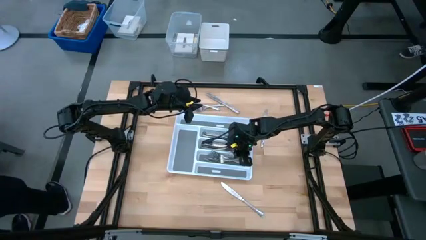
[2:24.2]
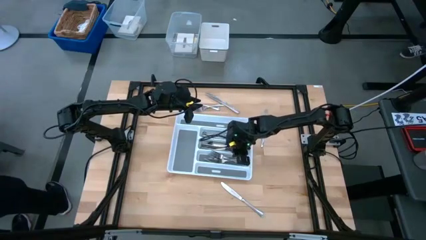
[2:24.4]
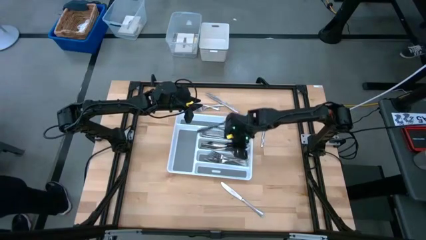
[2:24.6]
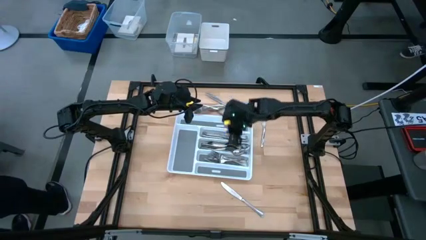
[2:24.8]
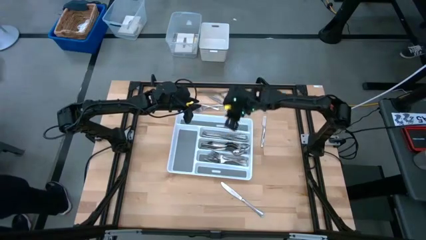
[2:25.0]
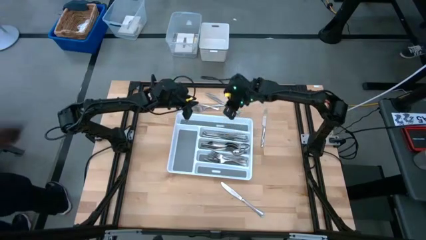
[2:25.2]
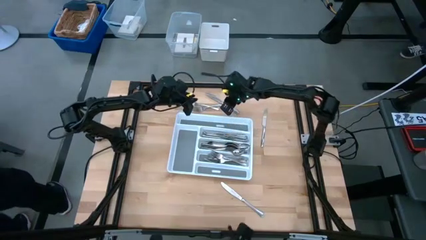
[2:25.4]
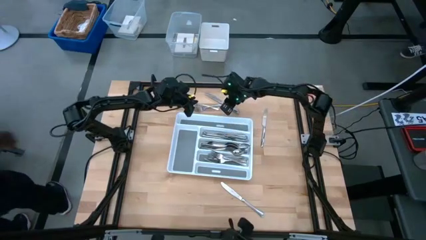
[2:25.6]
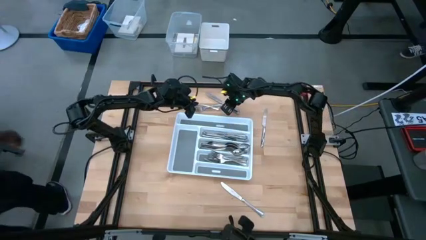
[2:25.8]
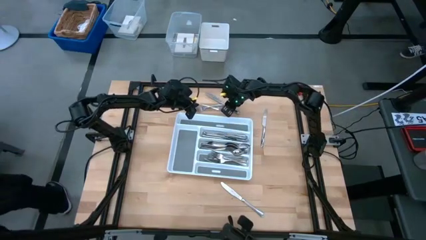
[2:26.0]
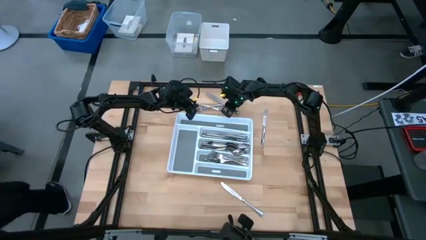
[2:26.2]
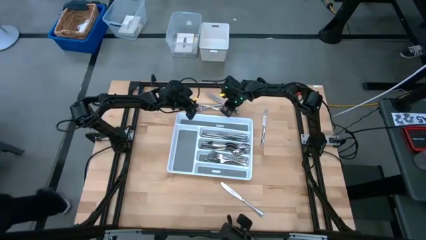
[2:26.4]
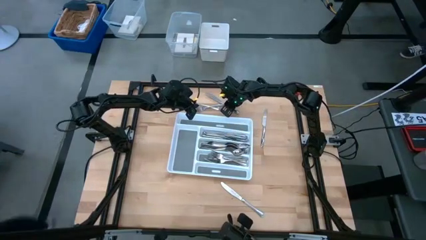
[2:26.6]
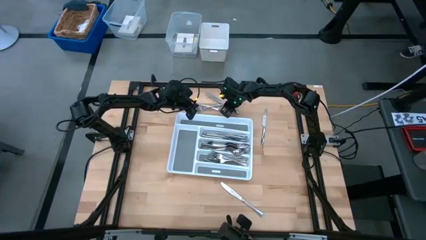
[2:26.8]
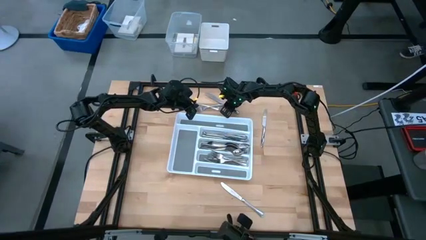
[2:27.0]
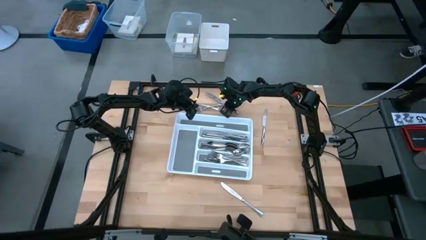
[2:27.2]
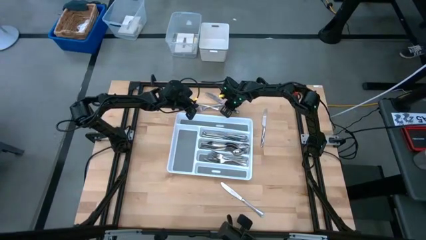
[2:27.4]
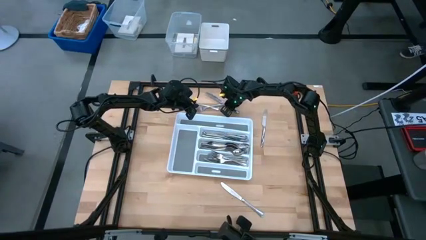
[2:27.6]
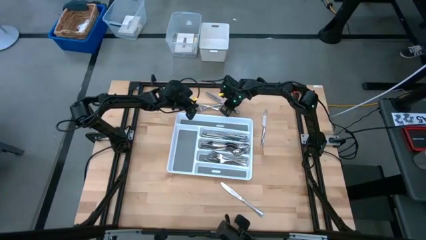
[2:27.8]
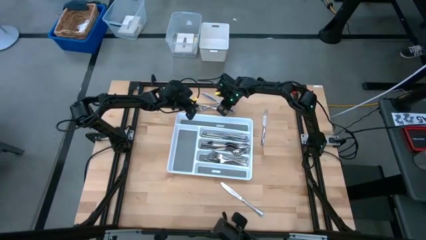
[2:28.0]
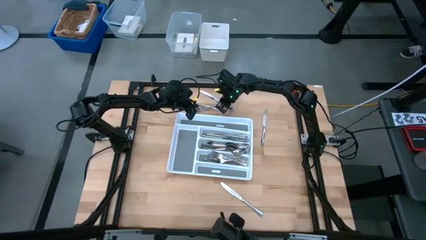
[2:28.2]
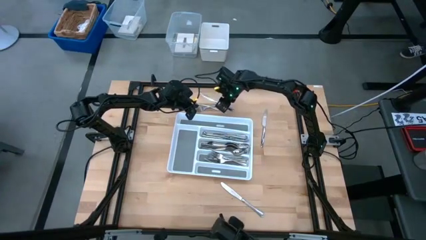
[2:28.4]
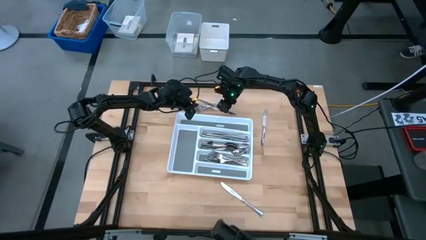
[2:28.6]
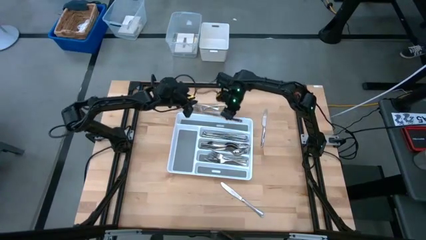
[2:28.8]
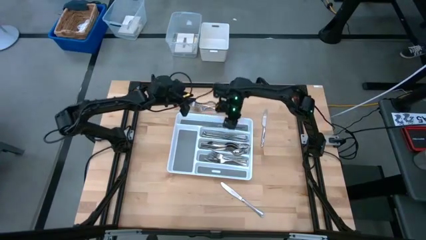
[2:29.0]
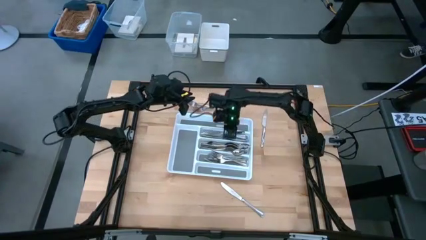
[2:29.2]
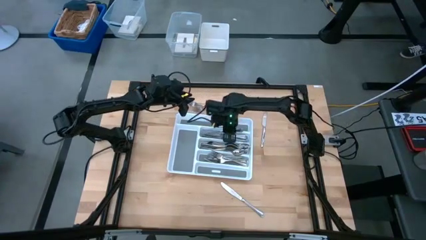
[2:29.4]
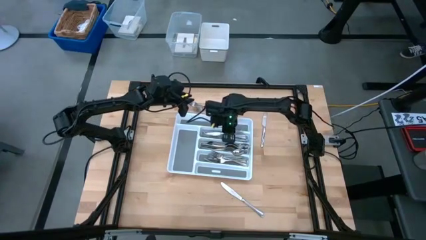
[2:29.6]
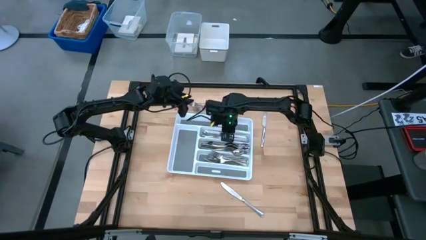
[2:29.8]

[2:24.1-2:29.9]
Task: Sort silverware
Put the knife into the organizer tray

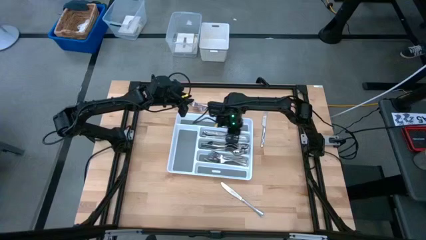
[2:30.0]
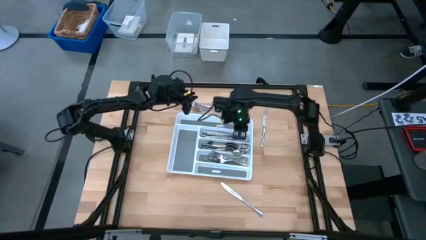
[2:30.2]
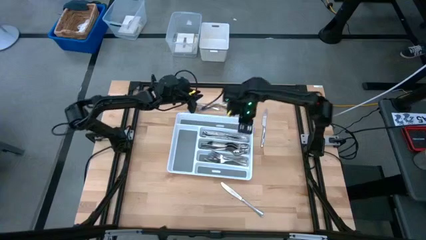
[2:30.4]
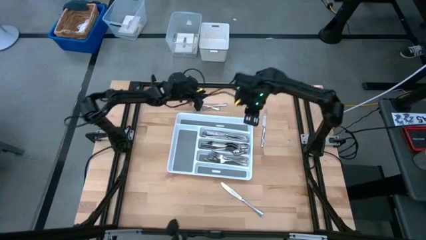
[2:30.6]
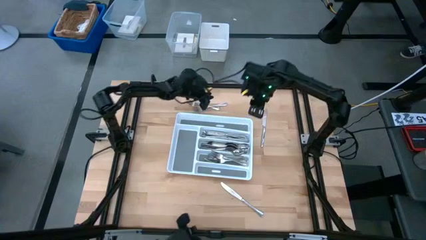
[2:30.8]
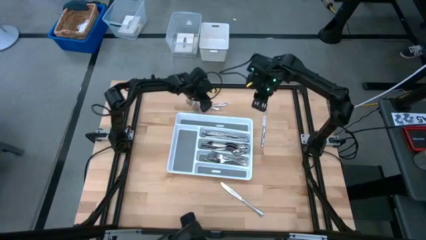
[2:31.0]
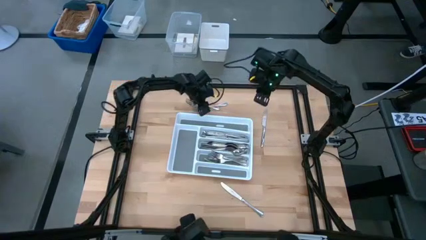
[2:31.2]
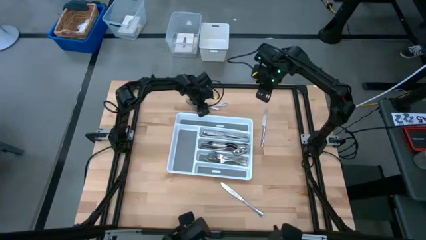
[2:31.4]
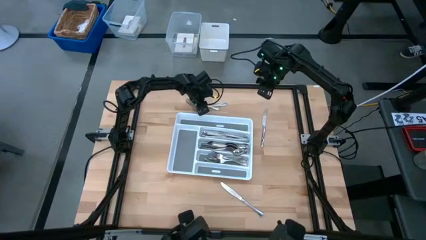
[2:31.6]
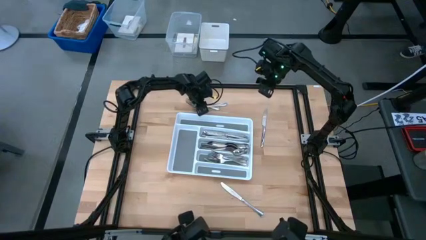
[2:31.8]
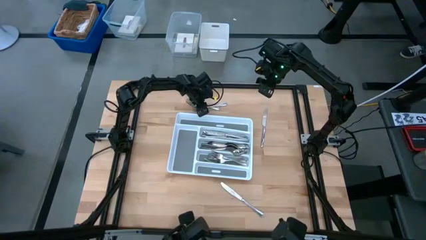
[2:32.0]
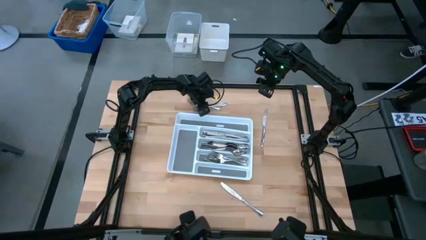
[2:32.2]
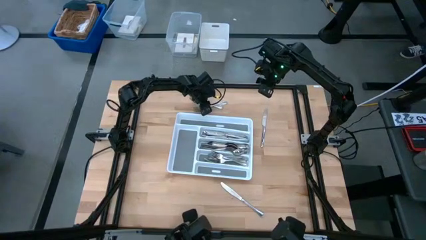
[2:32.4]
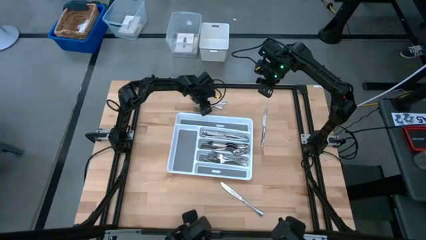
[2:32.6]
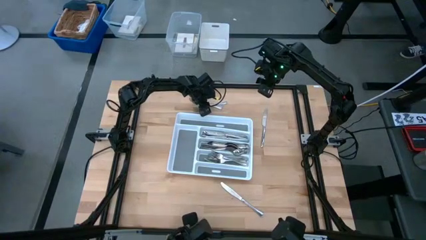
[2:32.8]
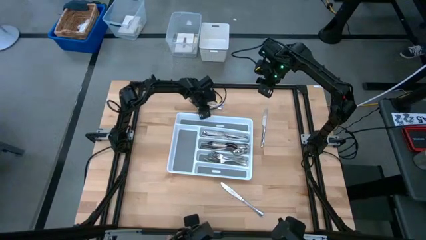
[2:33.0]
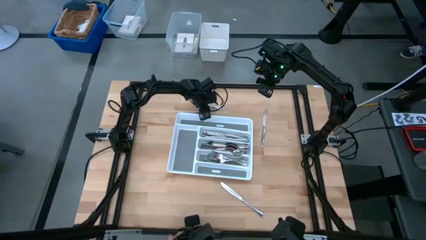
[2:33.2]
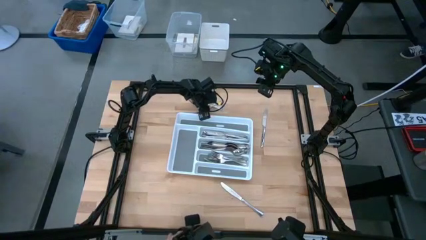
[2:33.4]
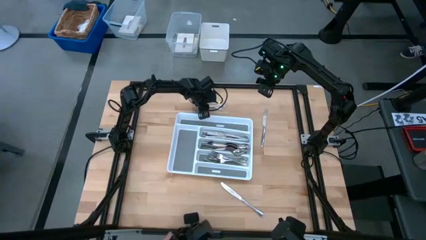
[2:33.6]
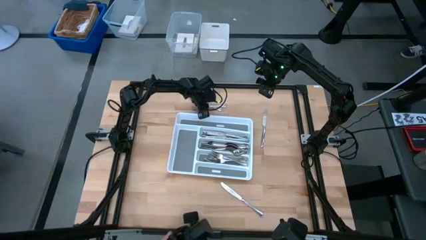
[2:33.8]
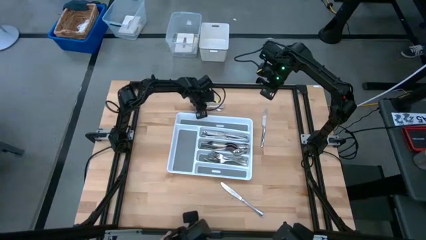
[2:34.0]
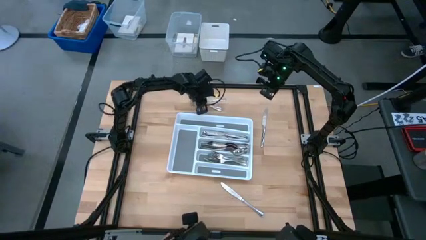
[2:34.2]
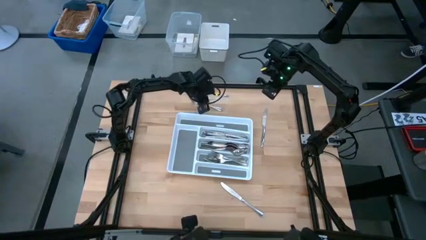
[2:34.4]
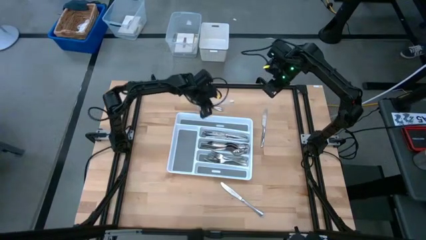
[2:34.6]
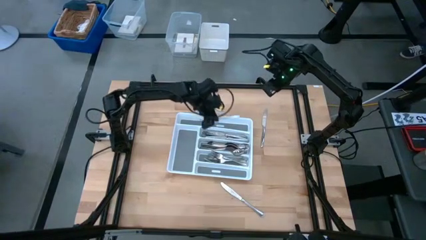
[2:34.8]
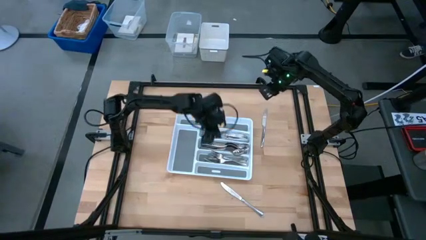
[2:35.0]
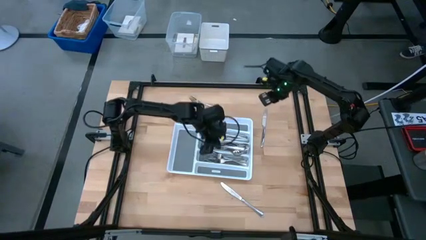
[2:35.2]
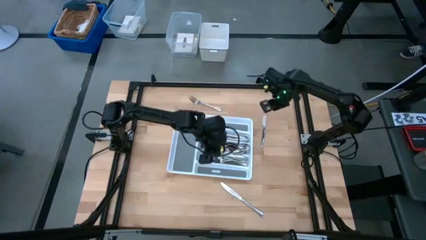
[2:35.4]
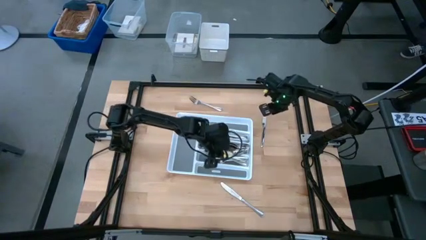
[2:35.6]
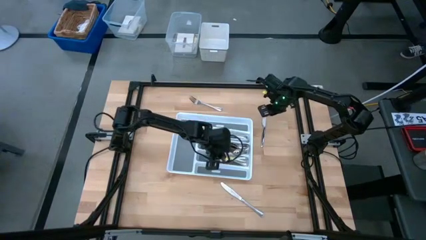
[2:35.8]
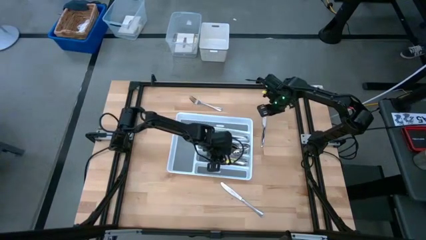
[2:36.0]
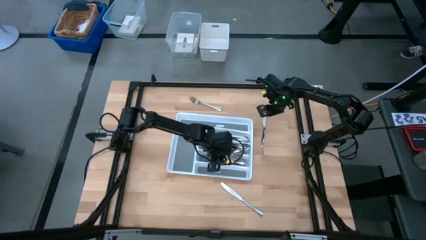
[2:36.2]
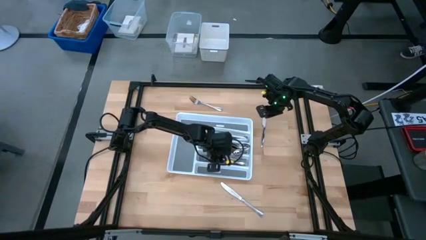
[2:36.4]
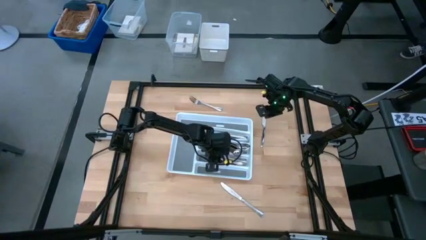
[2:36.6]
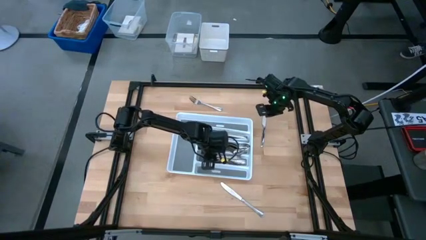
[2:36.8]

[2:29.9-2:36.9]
Put the fork into the organizer tray

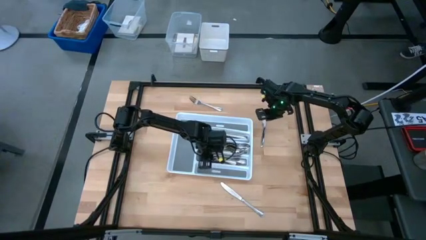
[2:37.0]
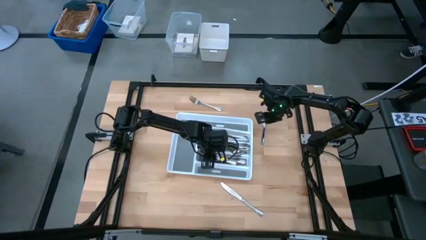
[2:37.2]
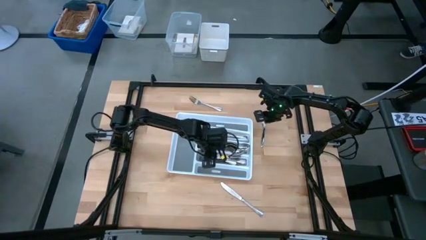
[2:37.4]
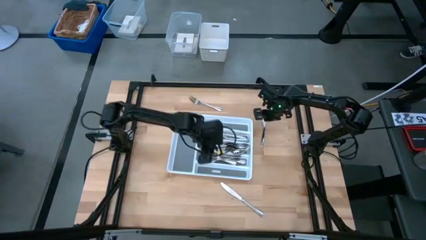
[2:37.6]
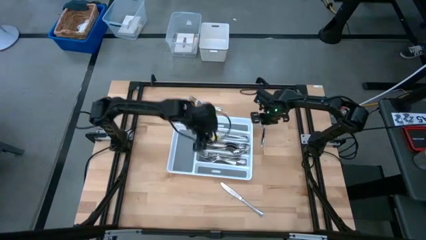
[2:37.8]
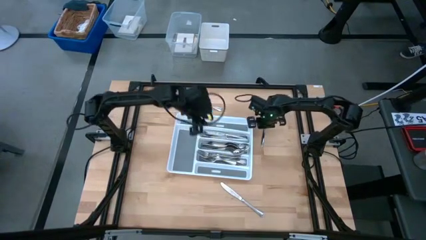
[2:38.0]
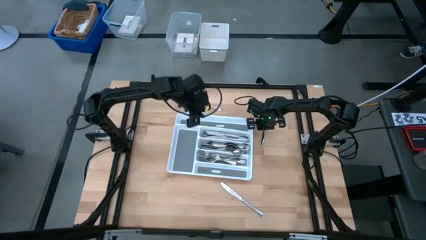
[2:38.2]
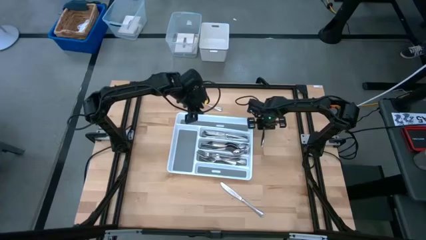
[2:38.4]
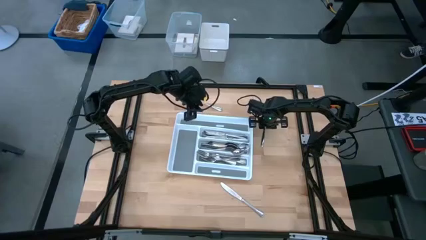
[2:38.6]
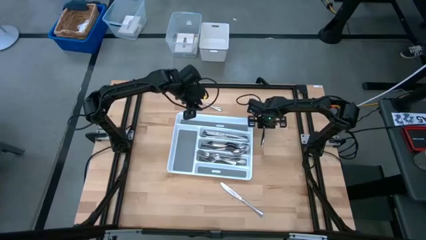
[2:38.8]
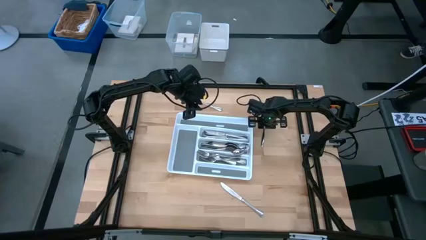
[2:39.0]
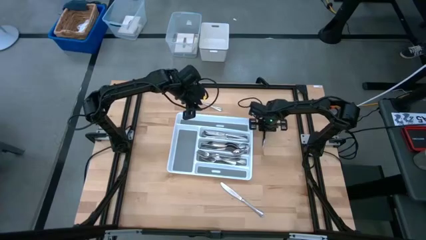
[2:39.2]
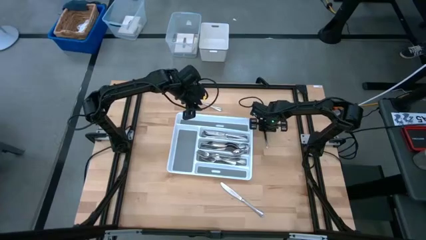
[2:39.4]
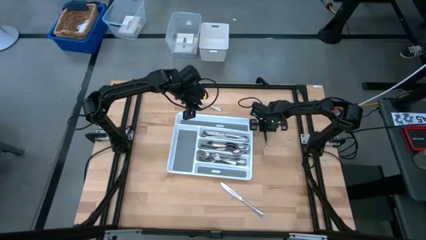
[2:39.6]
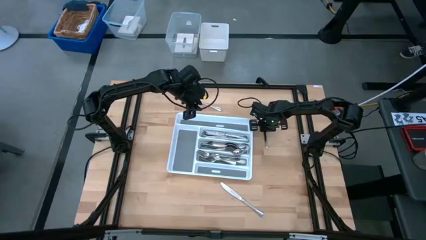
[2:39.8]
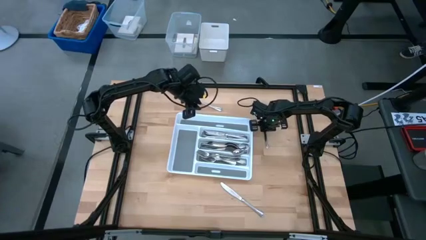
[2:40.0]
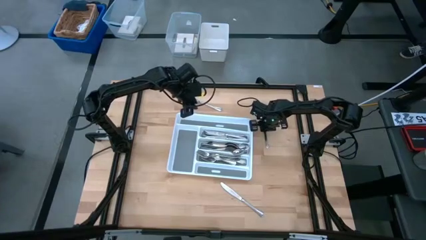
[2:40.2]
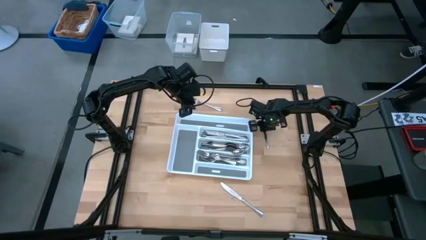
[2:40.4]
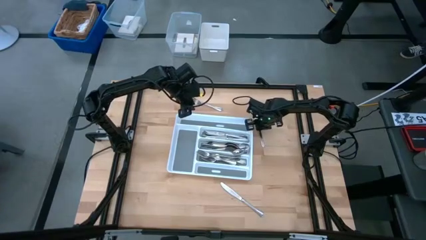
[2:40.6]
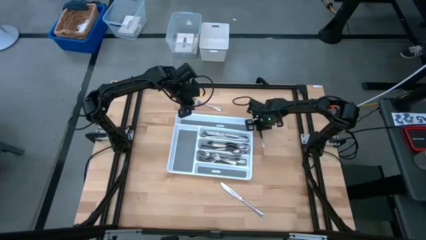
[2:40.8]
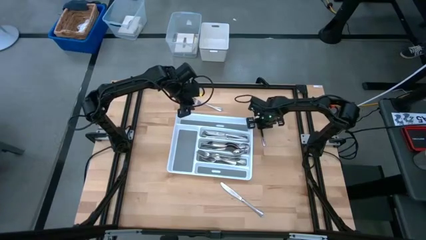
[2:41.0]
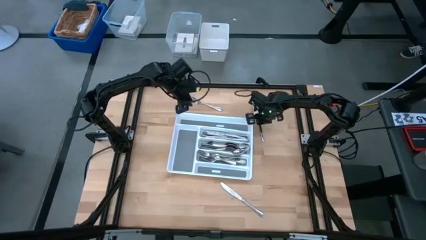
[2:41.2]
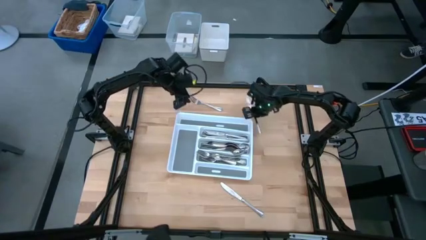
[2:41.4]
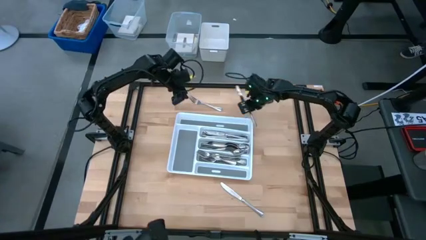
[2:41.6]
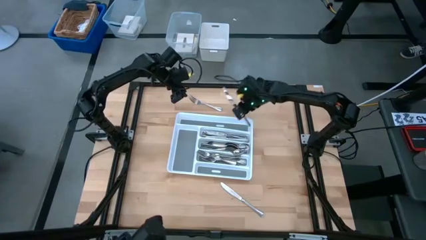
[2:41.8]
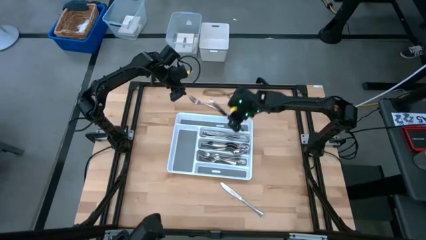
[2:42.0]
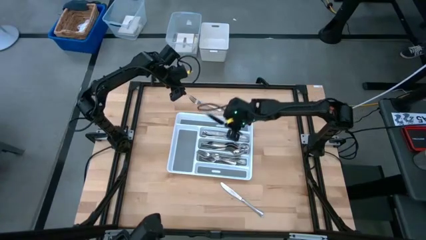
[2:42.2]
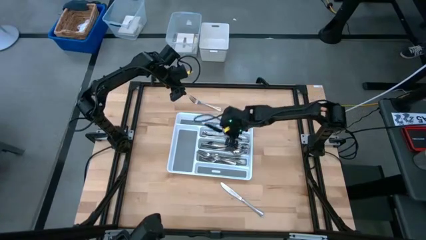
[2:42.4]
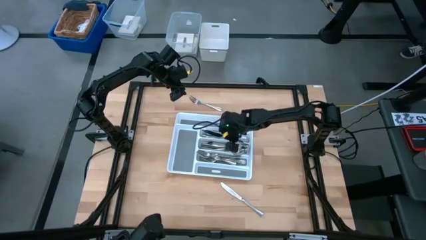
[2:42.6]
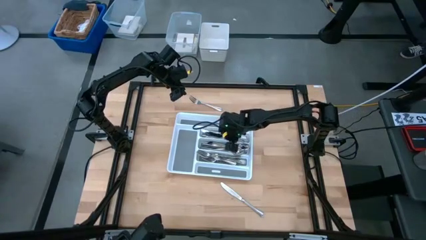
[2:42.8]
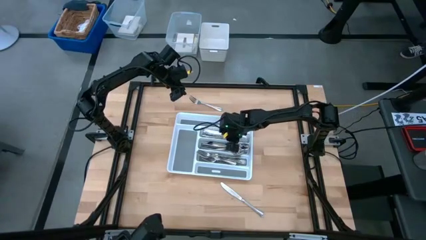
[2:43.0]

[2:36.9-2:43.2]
Put the knife into the organizer tray
